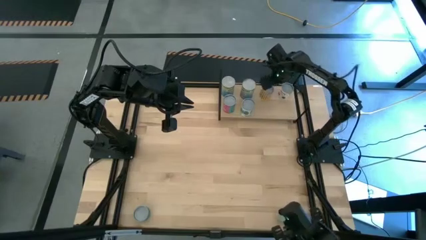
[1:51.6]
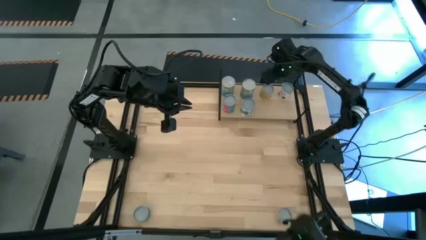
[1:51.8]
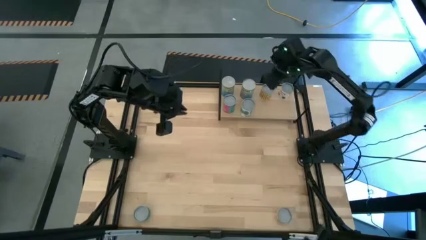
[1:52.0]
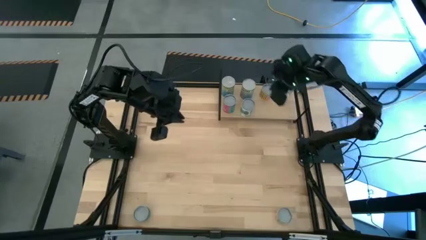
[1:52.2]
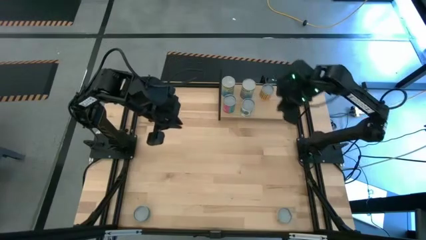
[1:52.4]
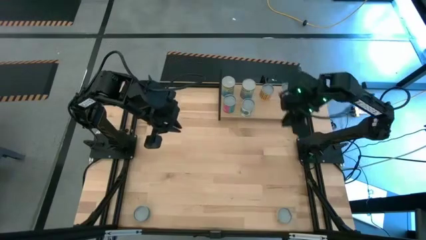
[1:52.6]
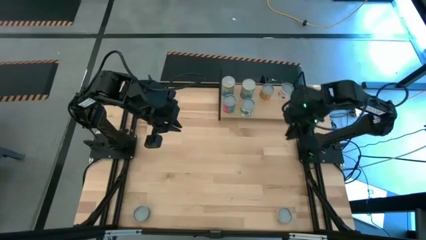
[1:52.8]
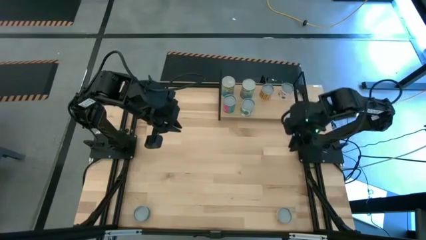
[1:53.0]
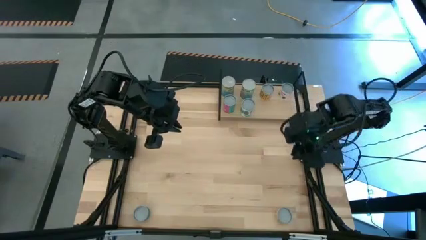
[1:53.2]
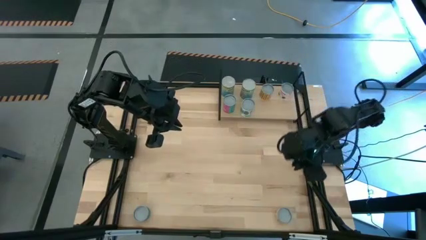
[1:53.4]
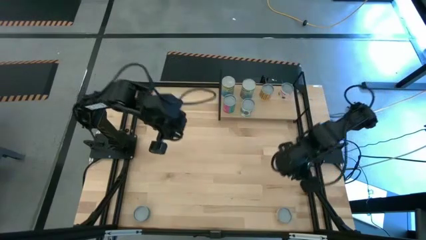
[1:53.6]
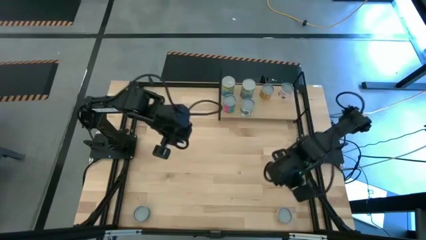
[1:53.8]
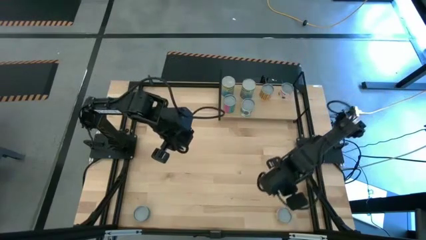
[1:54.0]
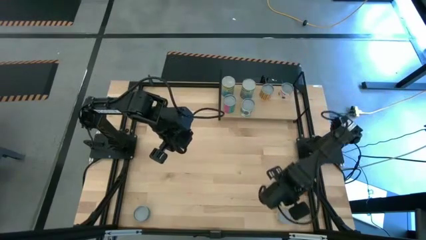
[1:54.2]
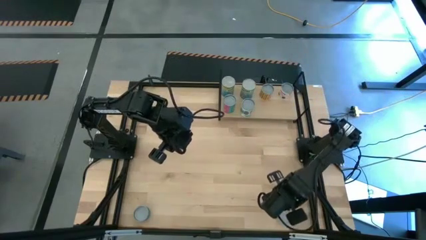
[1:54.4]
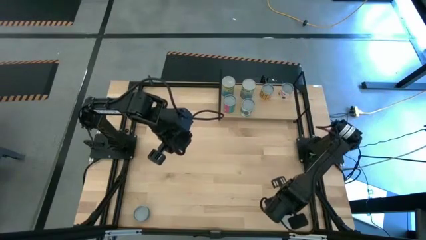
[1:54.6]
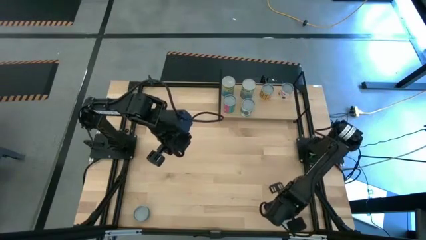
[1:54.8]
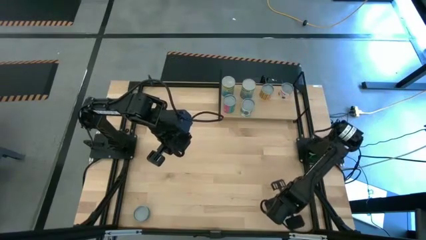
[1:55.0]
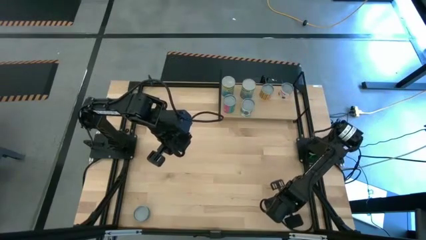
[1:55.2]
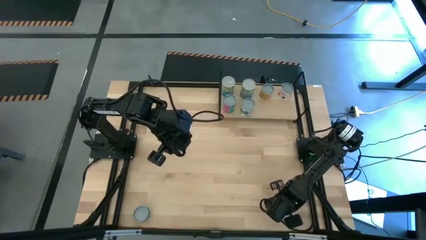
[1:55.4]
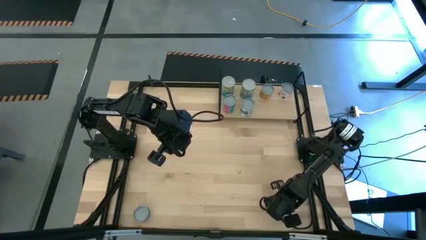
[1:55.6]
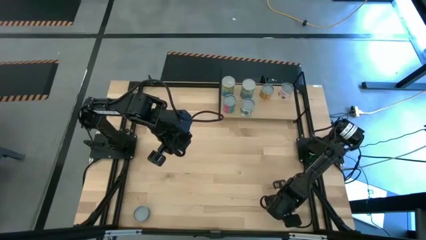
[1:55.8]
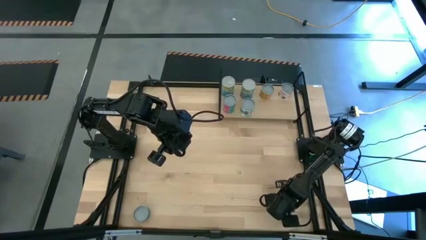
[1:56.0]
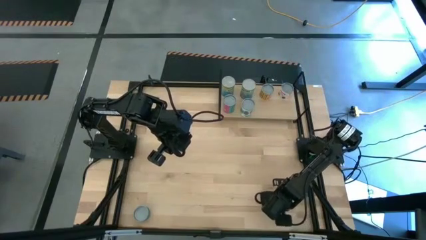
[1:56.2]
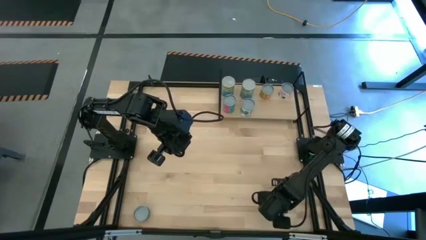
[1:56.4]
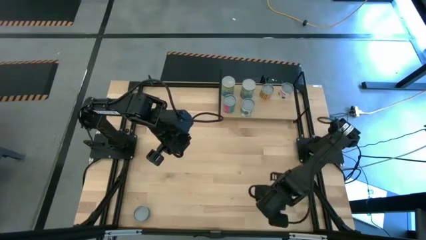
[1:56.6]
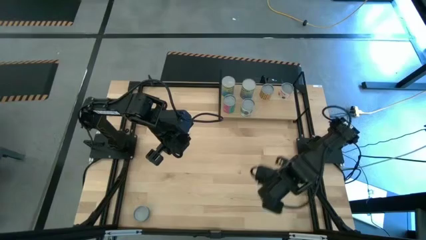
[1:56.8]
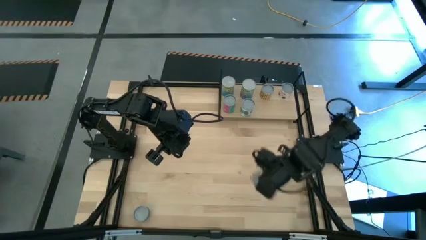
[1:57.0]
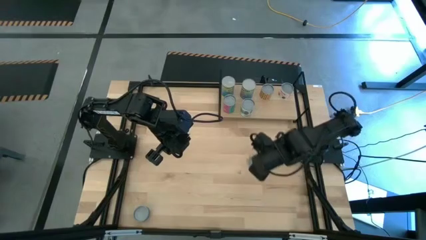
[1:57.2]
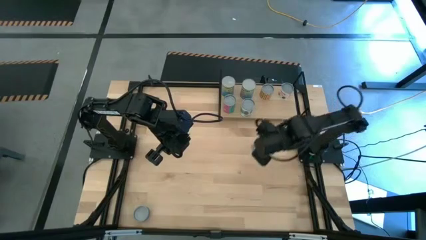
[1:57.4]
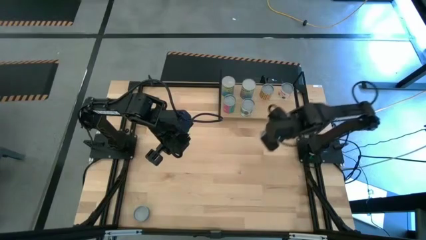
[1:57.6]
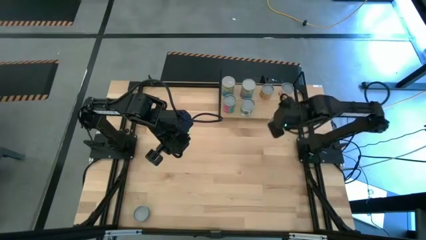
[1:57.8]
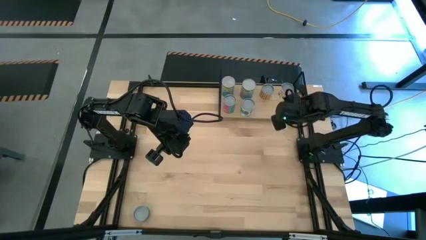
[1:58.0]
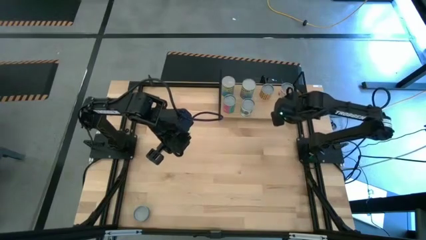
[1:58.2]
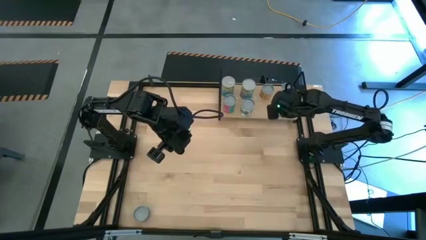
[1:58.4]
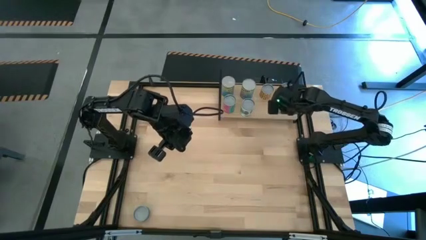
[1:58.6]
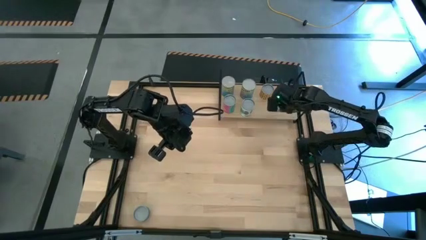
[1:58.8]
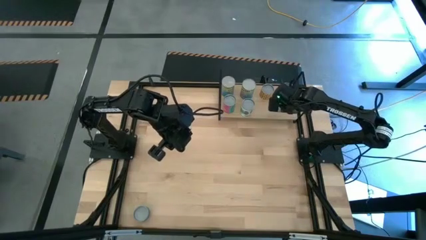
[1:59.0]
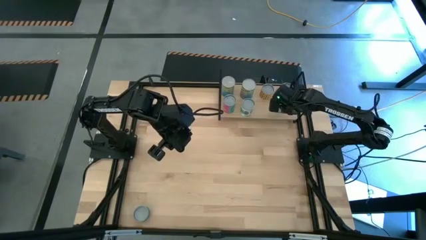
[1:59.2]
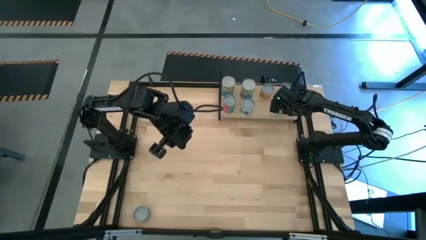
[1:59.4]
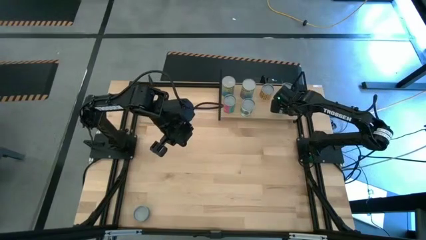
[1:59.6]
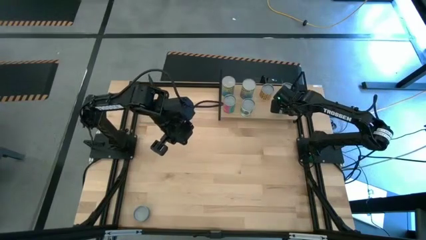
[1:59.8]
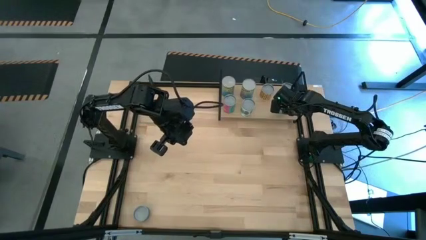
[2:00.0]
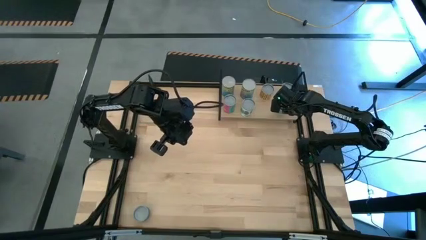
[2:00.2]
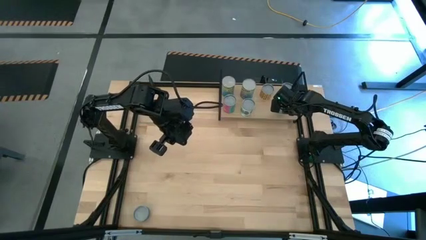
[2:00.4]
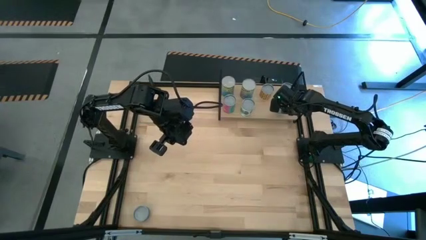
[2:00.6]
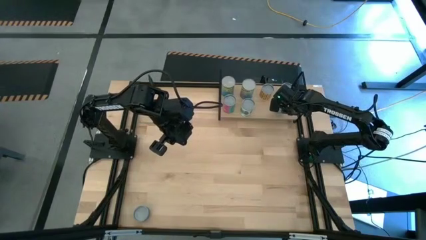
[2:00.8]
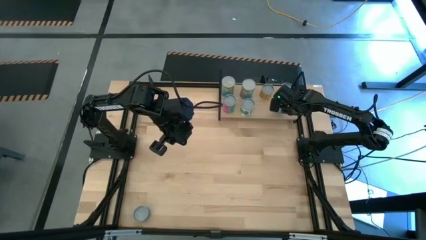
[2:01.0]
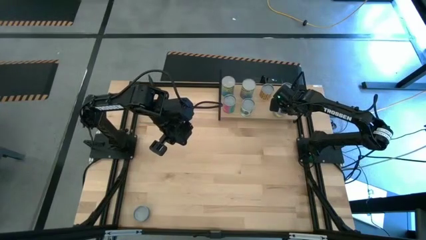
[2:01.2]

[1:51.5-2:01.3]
Task: Pick and place cans onto a shelf
Put the canned mushrooms on the shelf

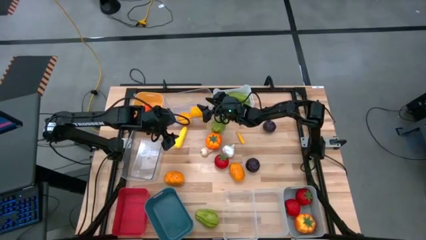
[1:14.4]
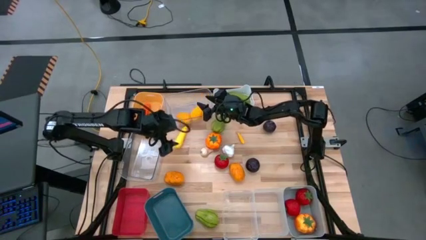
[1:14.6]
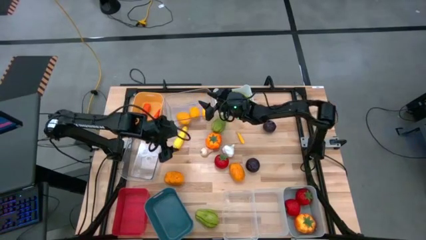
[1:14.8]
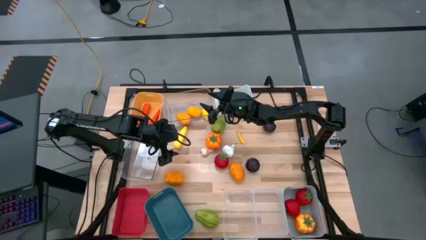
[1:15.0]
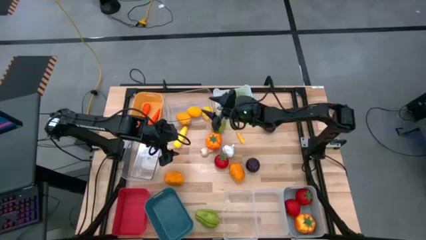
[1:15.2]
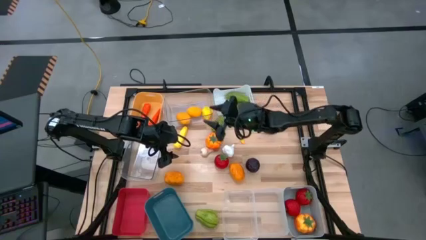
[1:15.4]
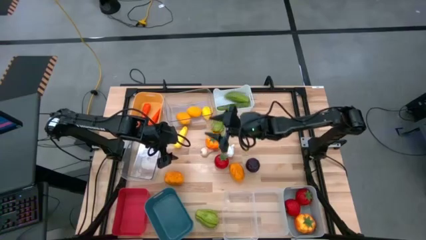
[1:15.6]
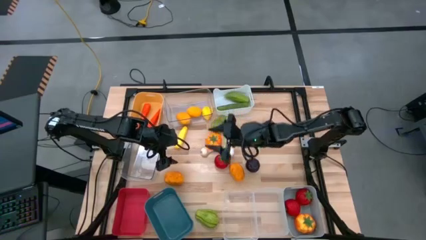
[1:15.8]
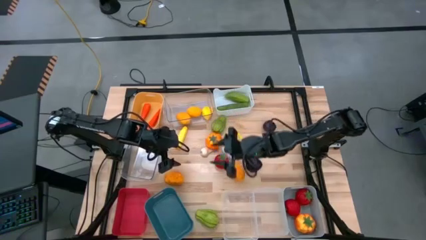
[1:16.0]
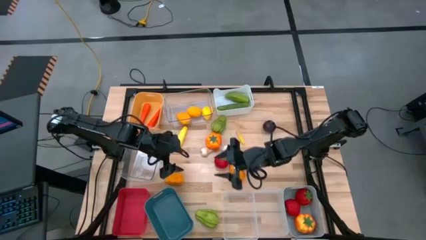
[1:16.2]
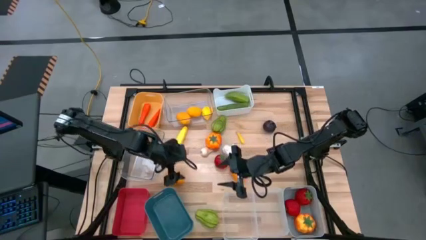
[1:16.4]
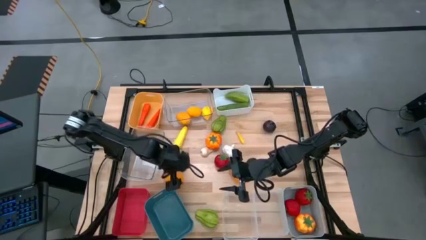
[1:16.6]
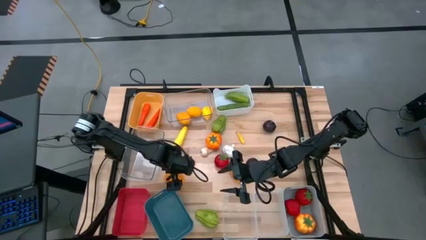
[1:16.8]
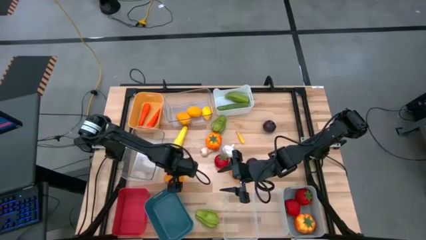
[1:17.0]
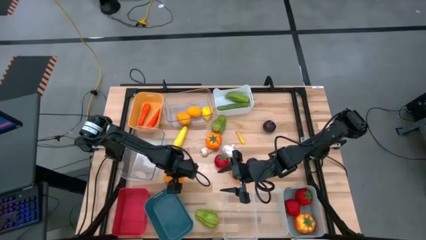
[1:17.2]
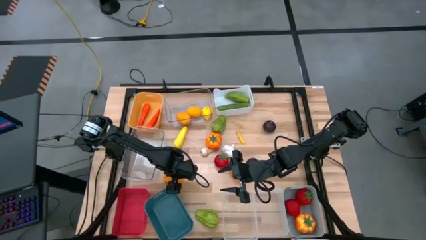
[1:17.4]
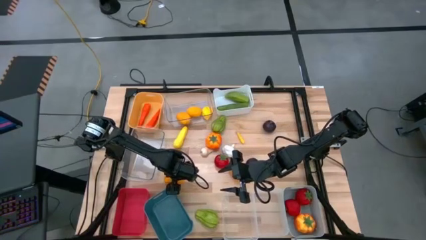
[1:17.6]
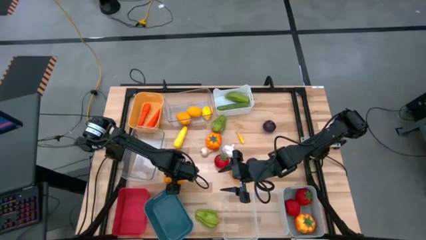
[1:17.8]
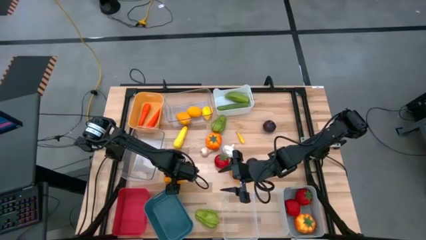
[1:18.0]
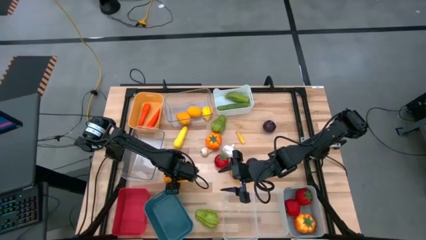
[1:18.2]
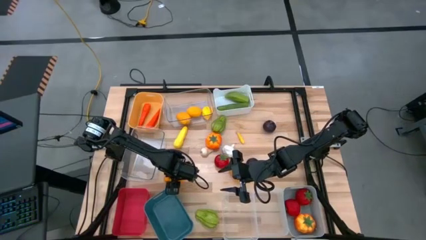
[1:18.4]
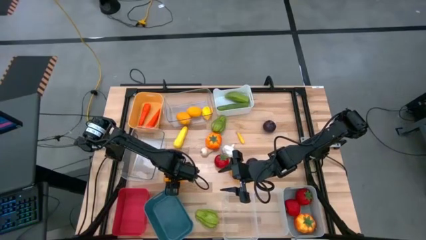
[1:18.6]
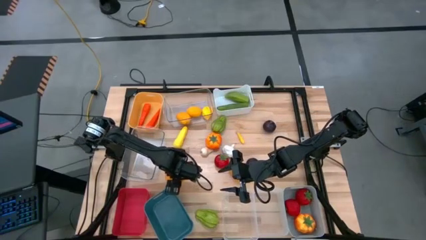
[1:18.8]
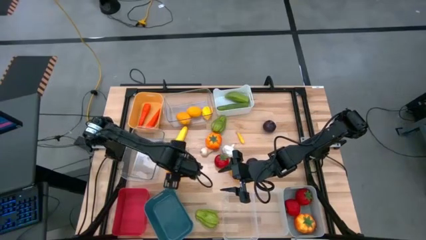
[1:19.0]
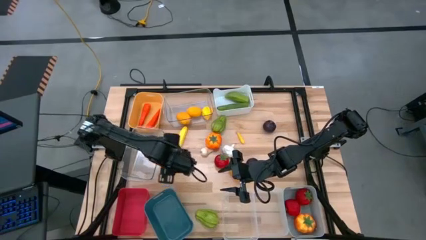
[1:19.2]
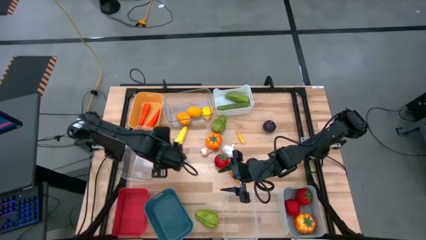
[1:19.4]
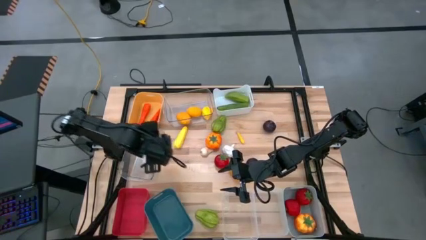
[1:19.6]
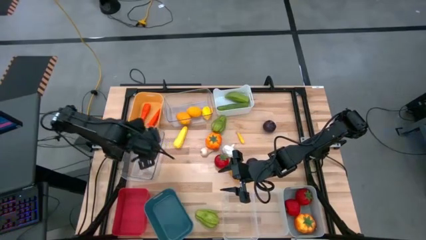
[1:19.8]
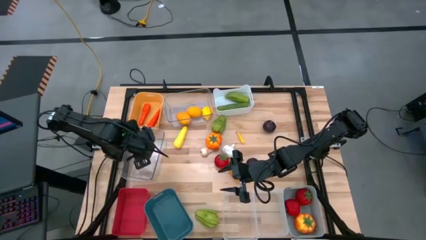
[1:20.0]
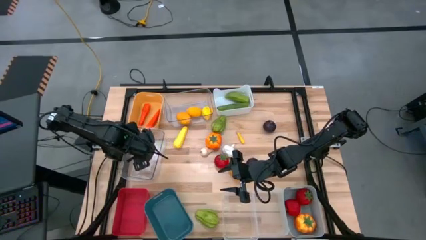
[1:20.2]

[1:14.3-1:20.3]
Task: Sort produce into baskets
Put the left brown potato into the middle transparent bin
